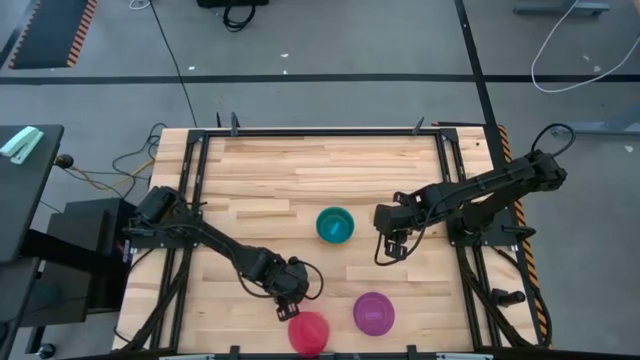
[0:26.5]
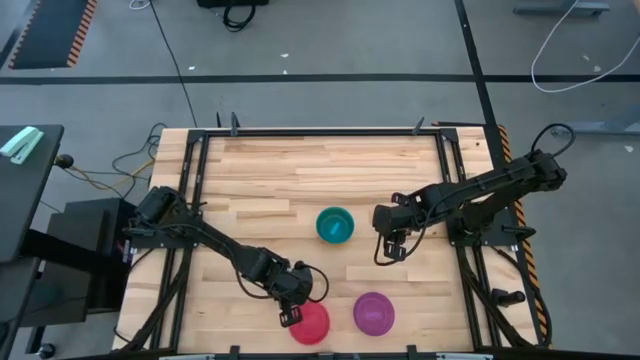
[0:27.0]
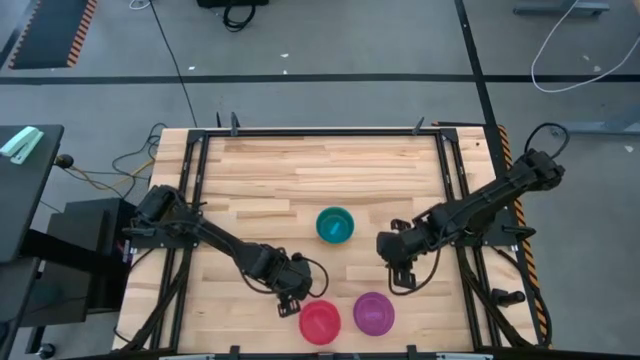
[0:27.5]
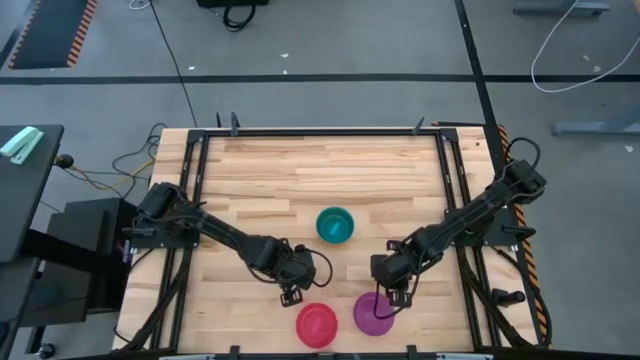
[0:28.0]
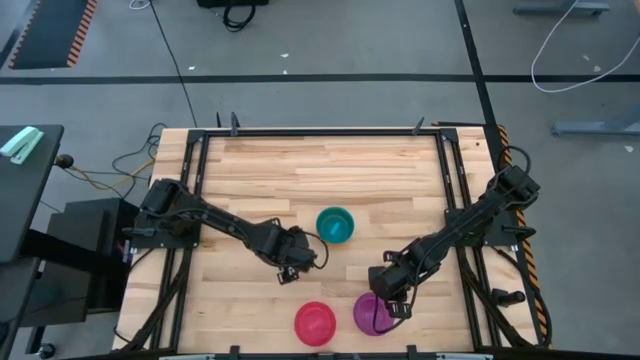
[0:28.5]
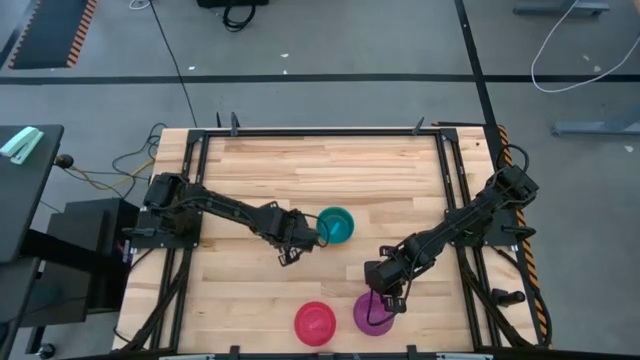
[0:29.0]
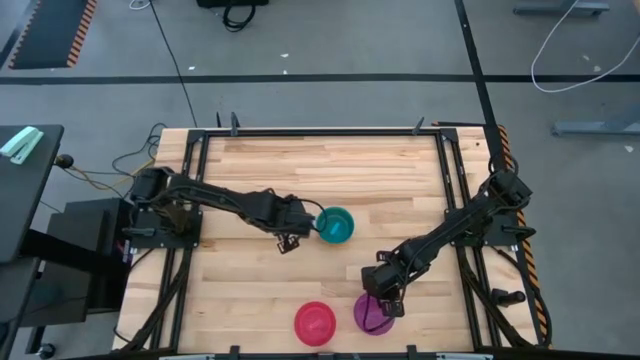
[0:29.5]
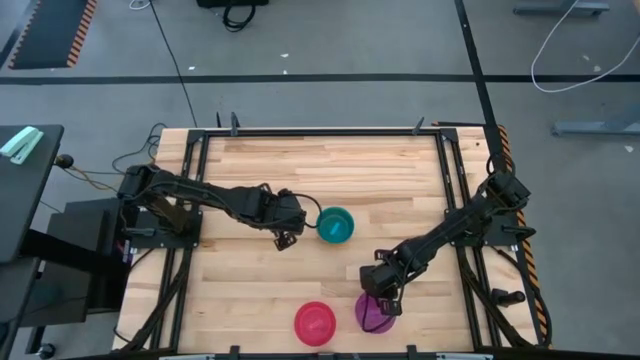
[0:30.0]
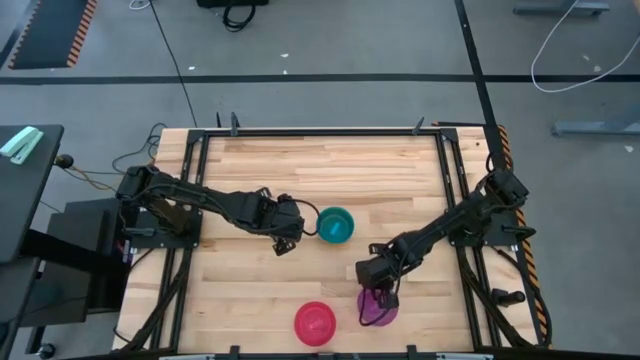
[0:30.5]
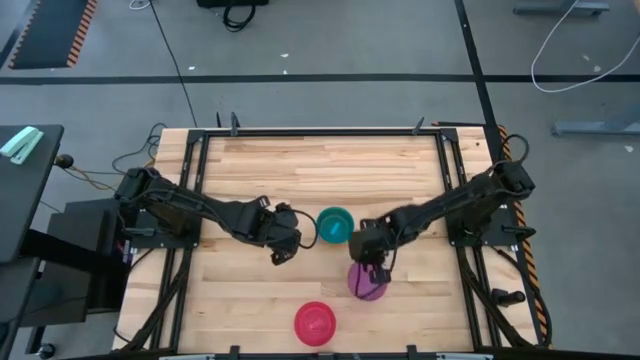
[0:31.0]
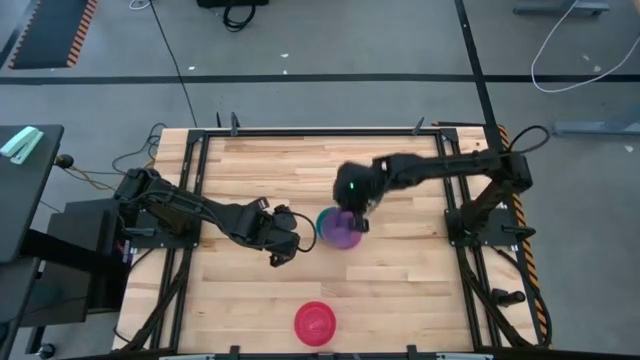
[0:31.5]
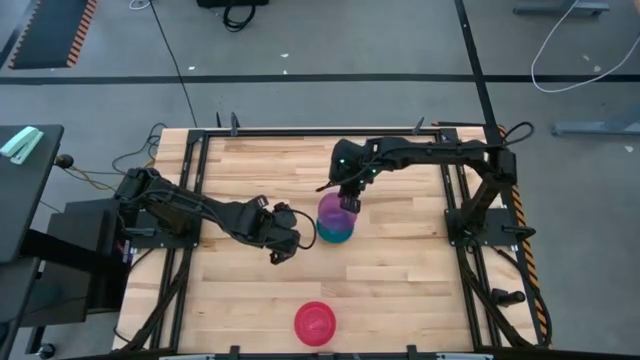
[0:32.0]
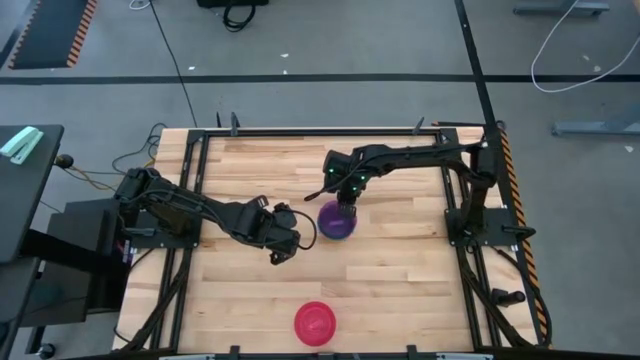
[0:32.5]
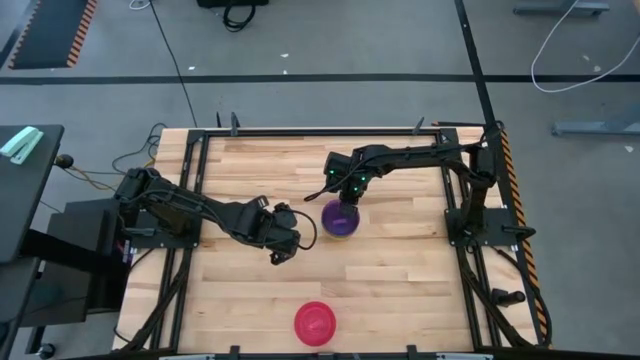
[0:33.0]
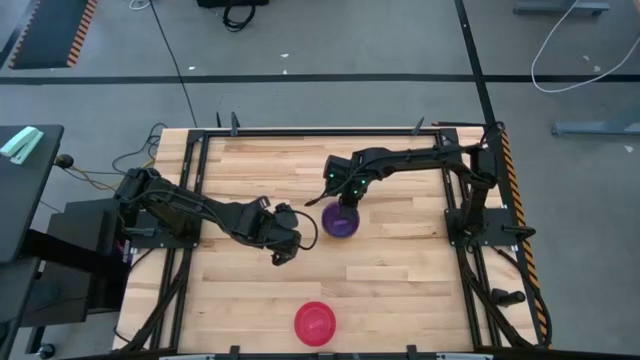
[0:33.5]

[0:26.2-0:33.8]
Task: Nest bowls inside each other
Stack the violet bowl on the blue bowl

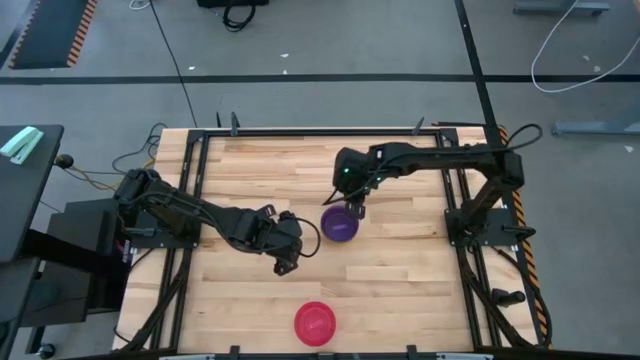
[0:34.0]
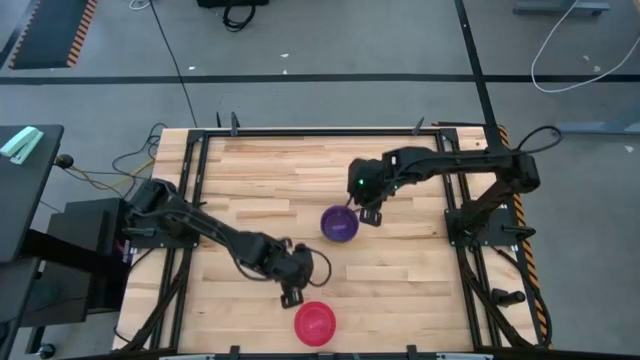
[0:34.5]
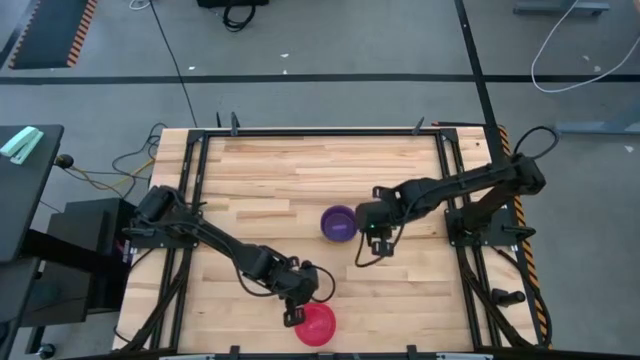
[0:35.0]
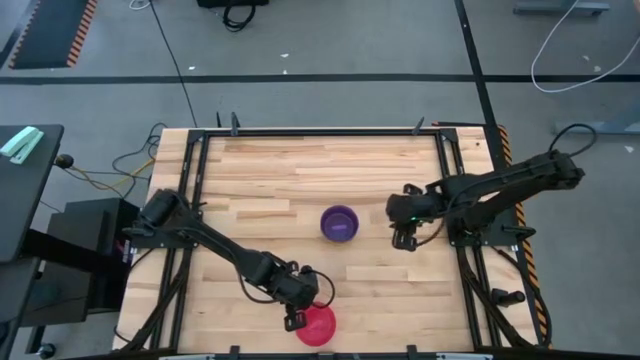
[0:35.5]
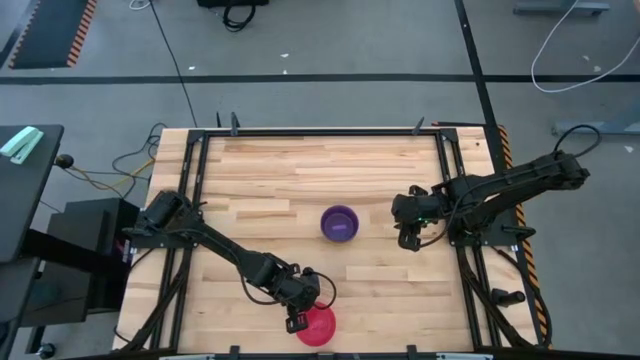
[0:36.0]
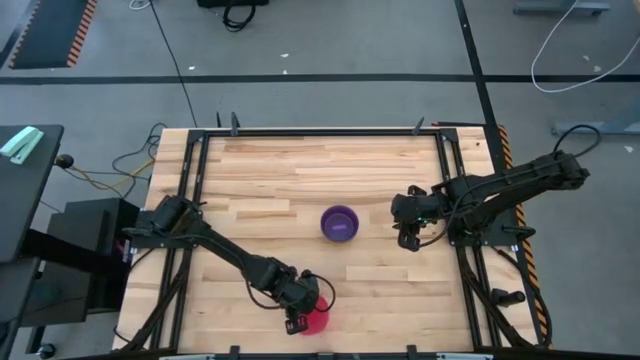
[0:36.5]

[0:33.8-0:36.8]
Stack the pink bowl on the violet bowl

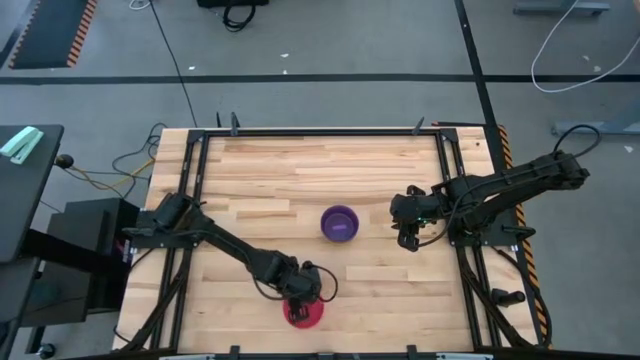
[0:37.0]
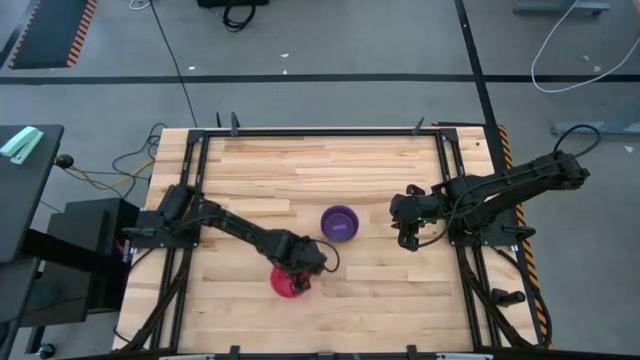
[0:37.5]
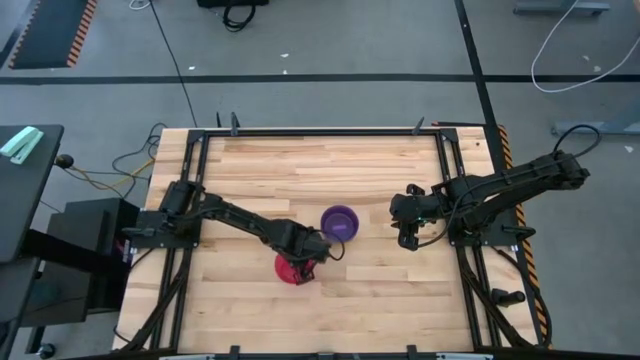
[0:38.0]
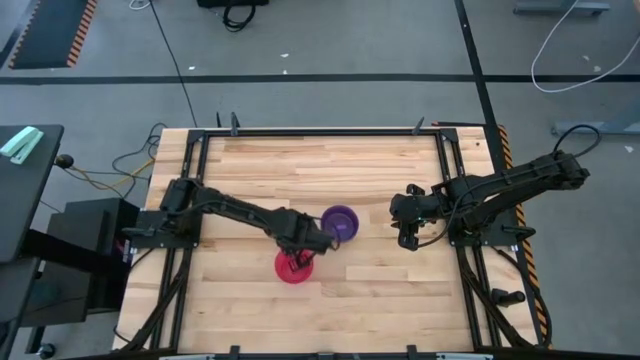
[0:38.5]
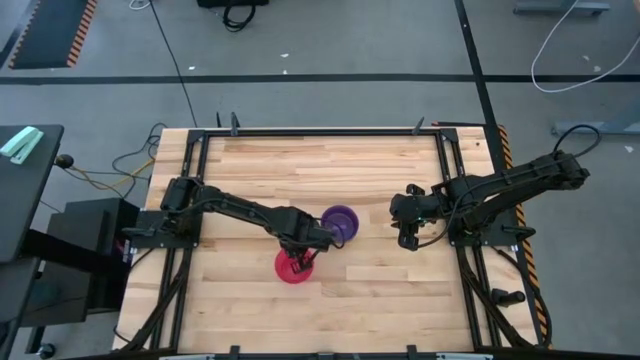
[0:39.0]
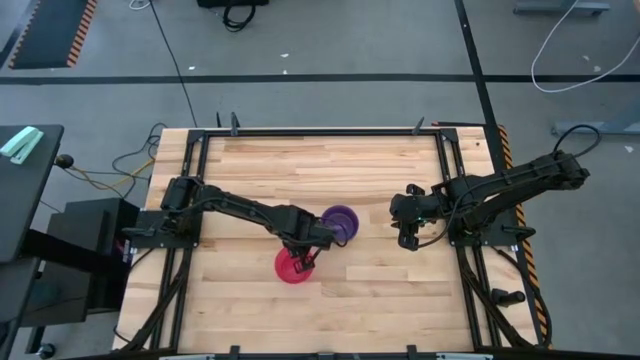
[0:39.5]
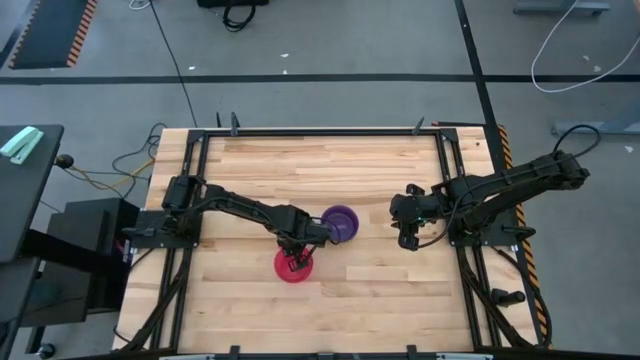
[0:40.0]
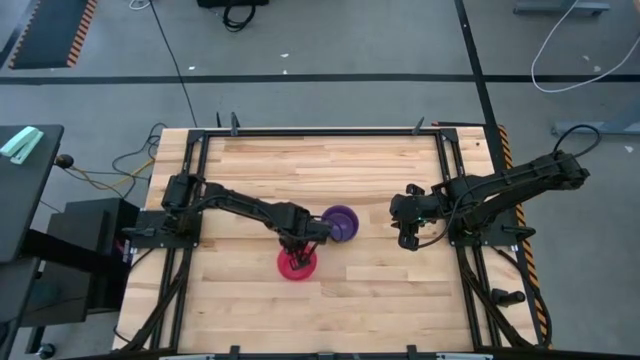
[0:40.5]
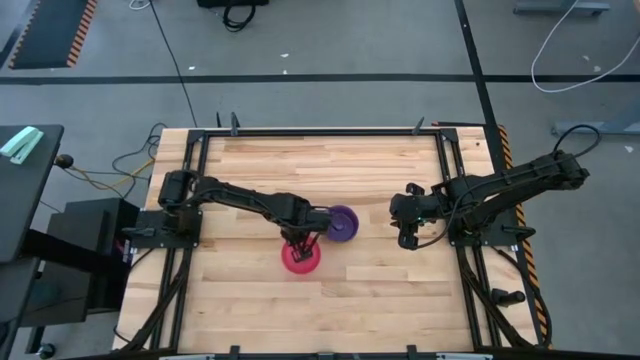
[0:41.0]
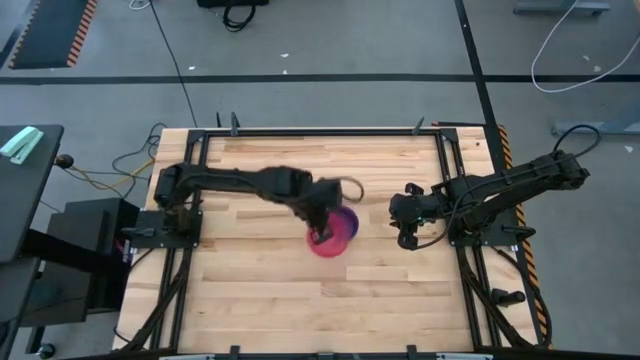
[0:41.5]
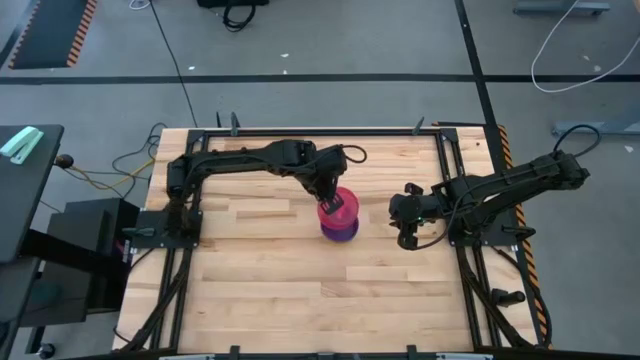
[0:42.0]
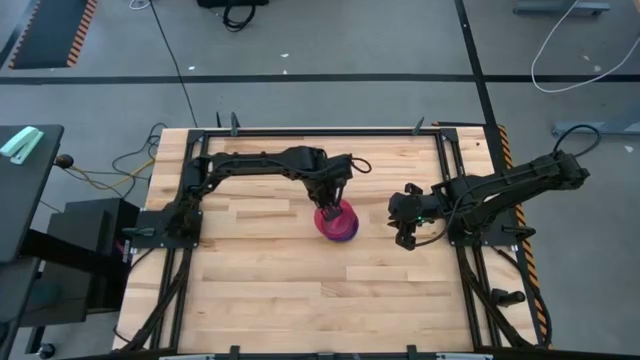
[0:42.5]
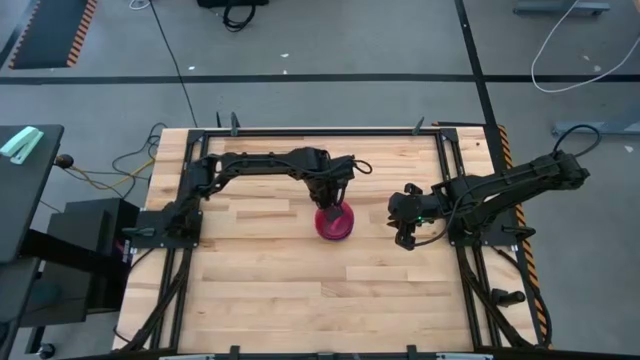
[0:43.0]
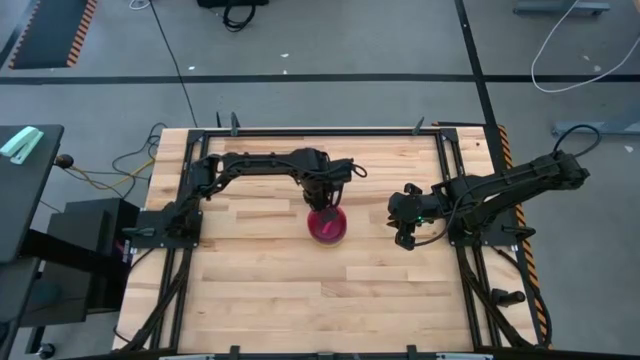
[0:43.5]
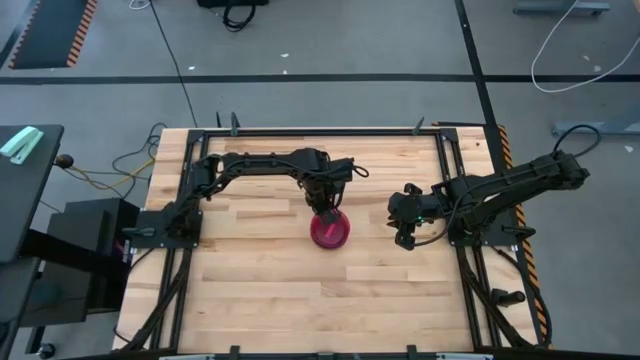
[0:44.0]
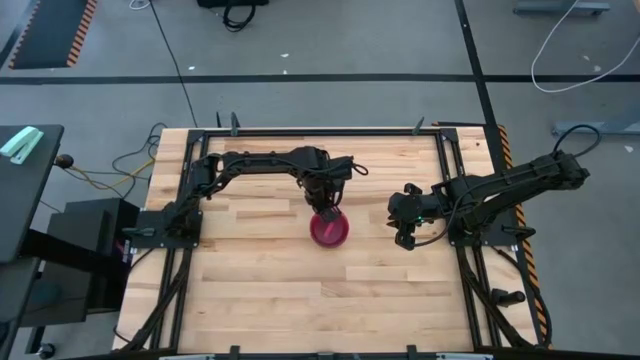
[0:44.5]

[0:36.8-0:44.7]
Stack the pink bowl on the violet bowl

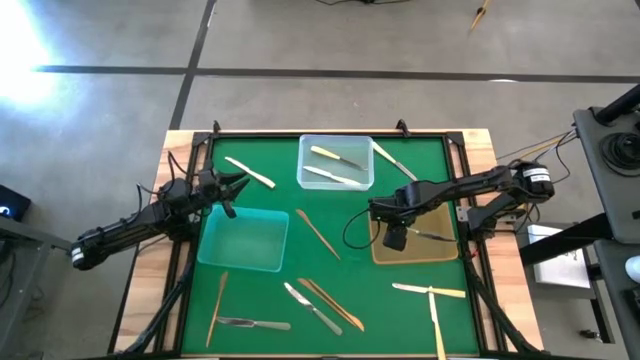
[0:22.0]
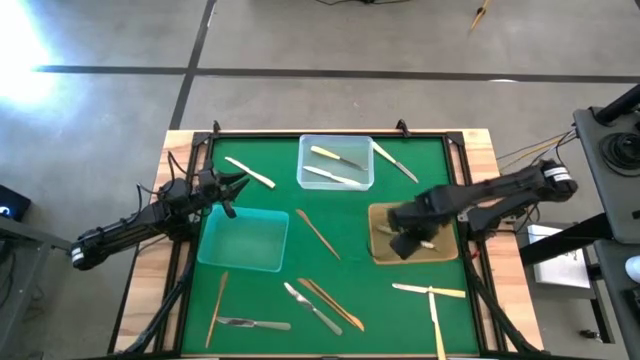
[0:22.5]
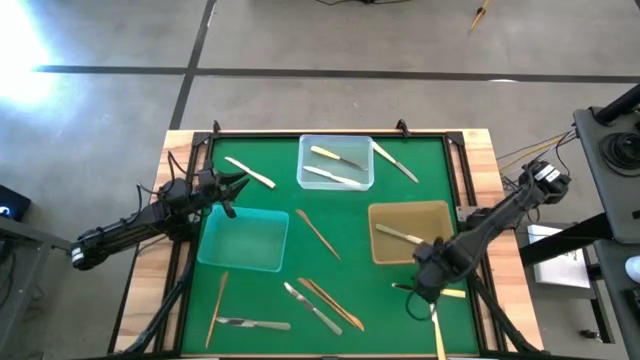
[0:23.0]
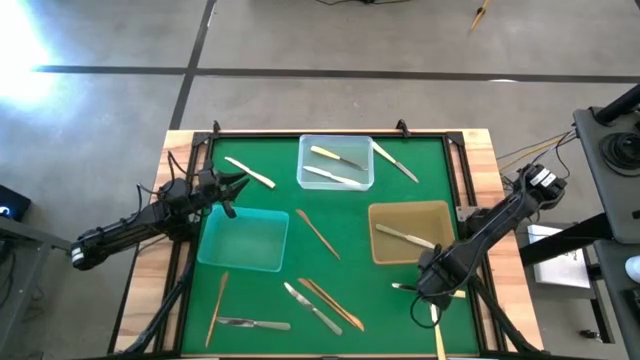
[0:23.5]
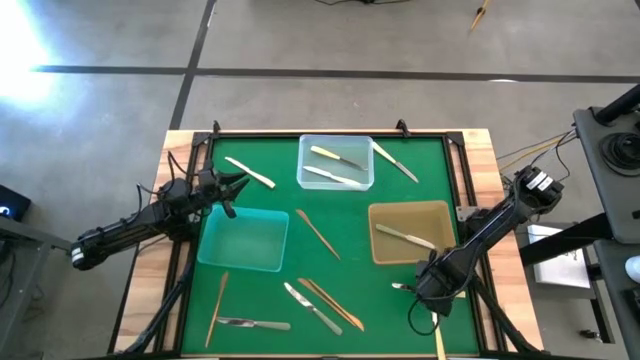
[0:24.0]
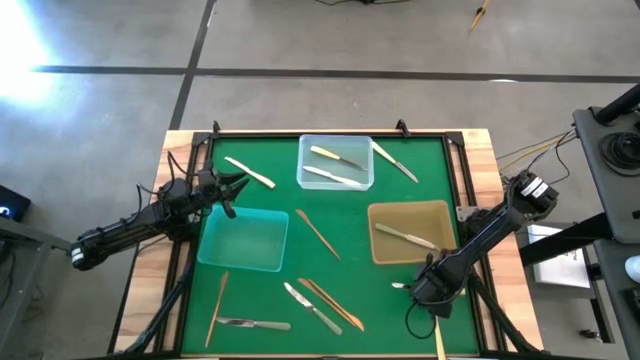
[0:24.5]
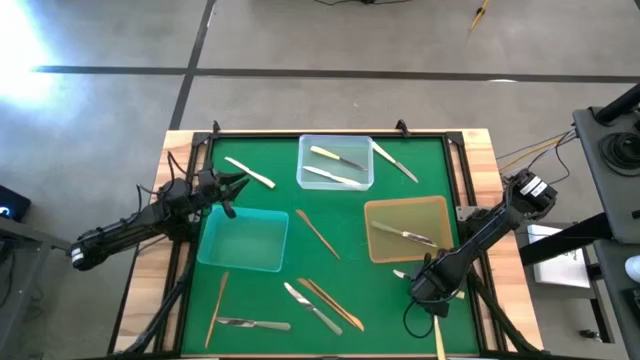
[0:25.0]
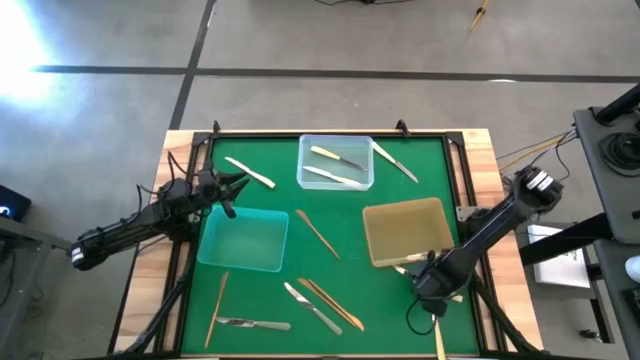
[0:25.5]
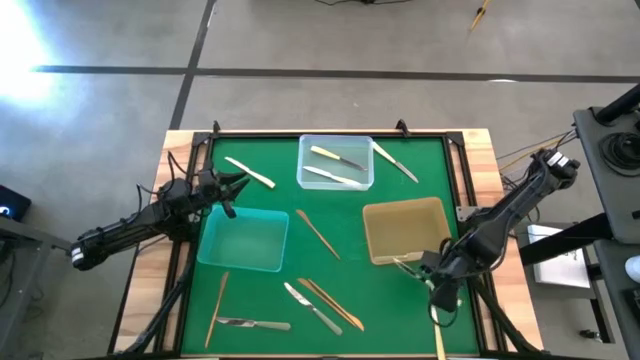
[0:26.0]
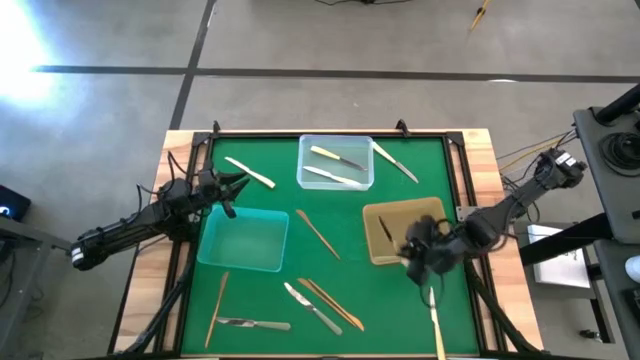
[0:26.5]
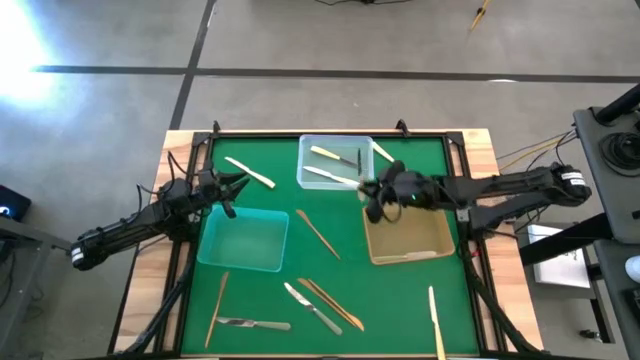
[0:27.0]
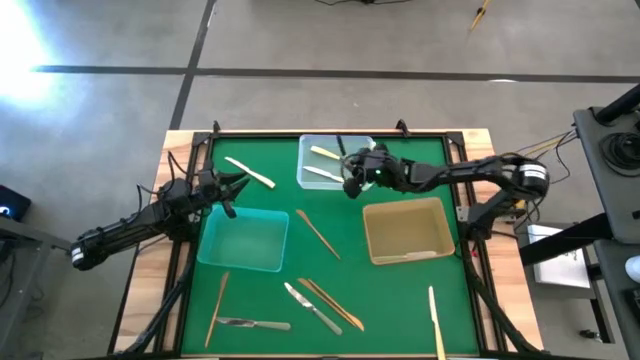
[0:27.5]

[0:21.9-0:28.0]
Task: Sort silverware by color (type)
Put the yellow knife into the transparent bin
